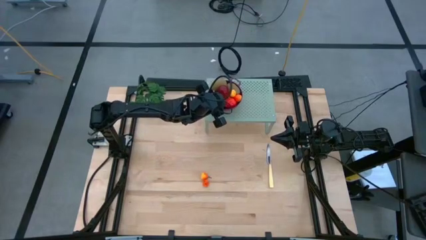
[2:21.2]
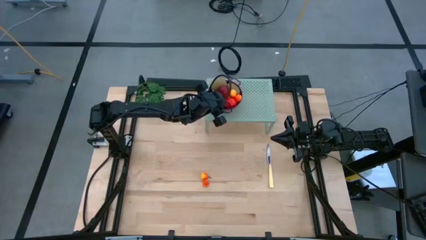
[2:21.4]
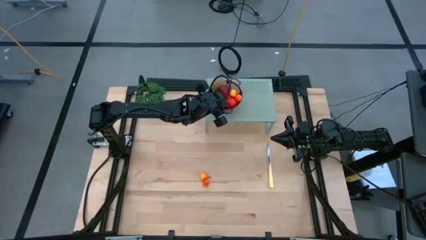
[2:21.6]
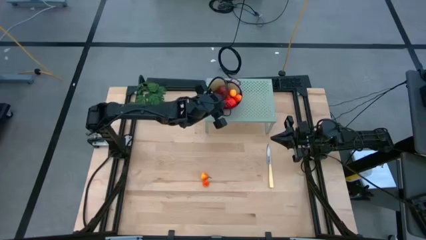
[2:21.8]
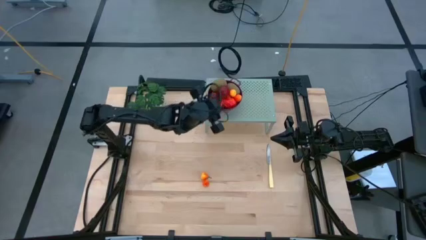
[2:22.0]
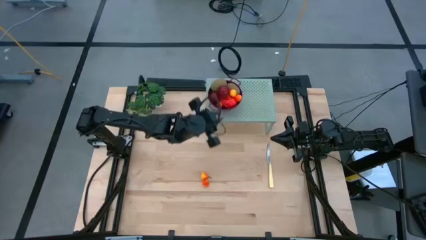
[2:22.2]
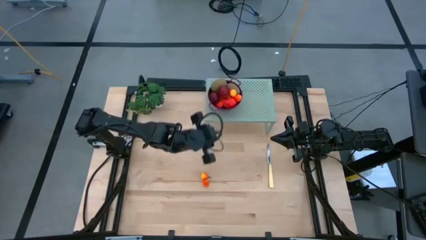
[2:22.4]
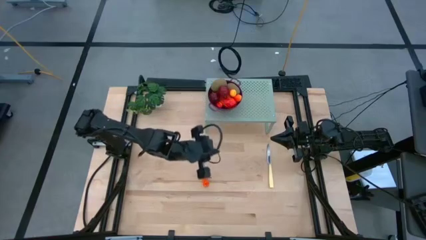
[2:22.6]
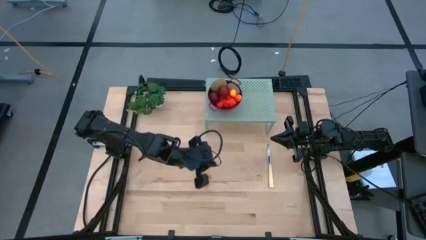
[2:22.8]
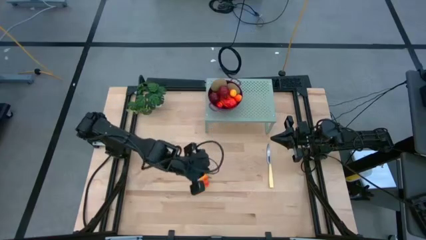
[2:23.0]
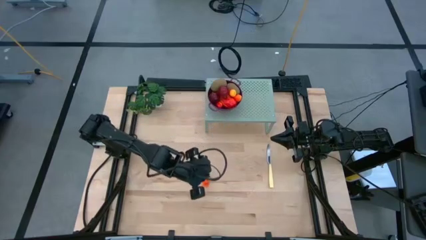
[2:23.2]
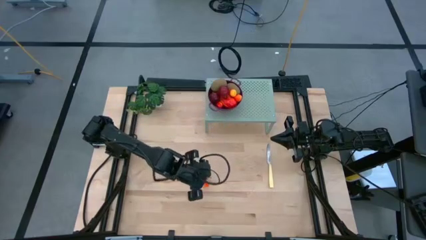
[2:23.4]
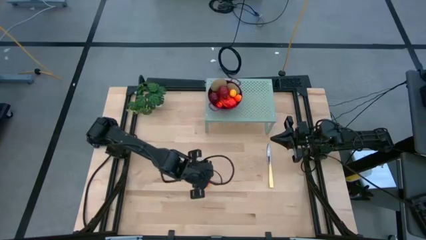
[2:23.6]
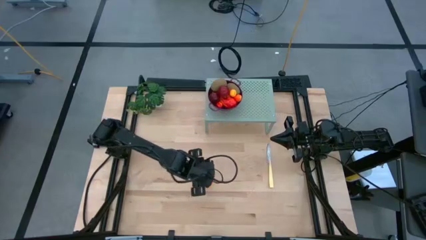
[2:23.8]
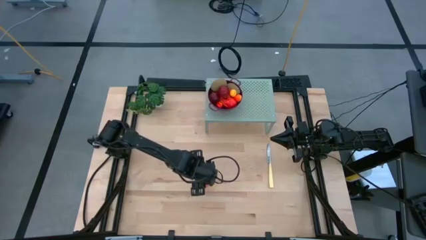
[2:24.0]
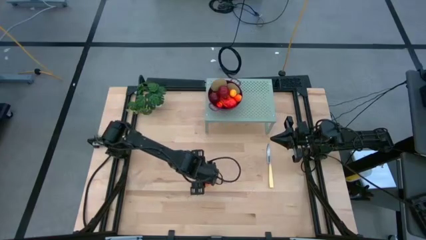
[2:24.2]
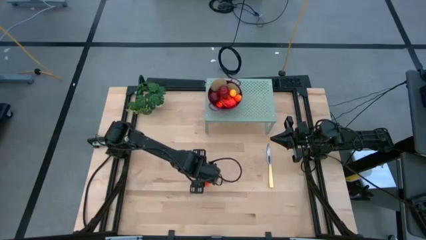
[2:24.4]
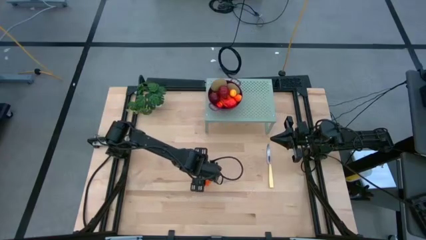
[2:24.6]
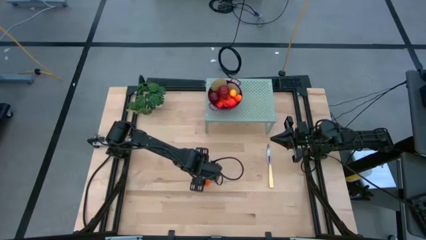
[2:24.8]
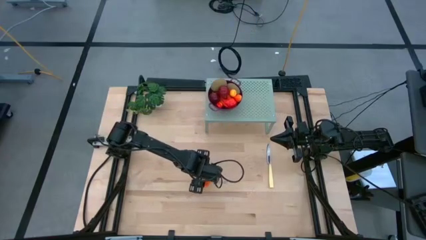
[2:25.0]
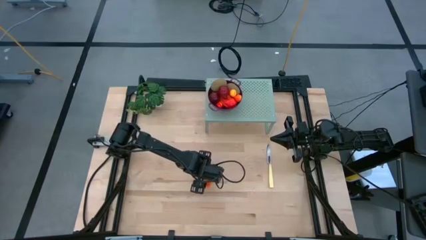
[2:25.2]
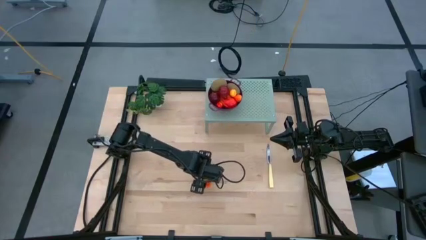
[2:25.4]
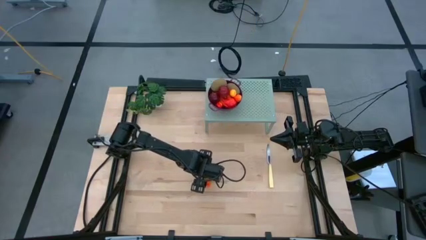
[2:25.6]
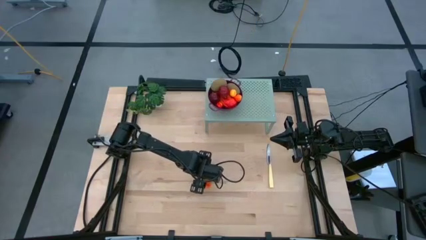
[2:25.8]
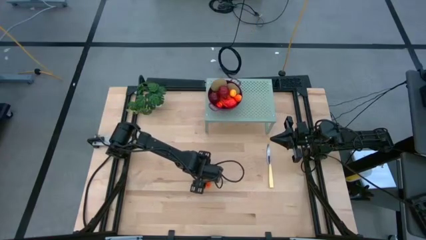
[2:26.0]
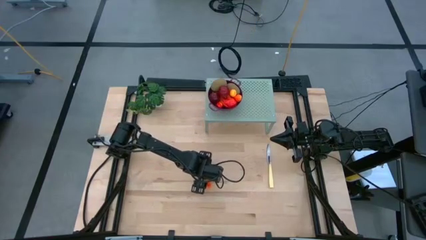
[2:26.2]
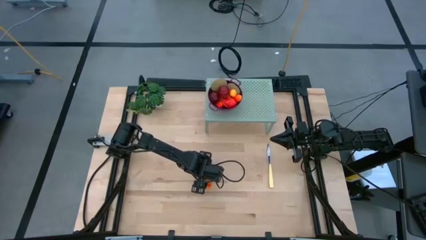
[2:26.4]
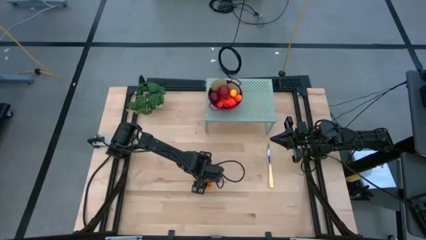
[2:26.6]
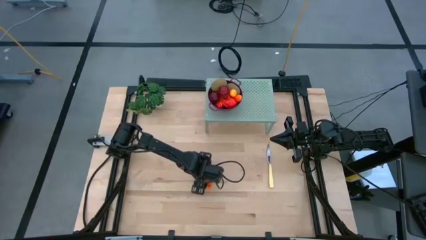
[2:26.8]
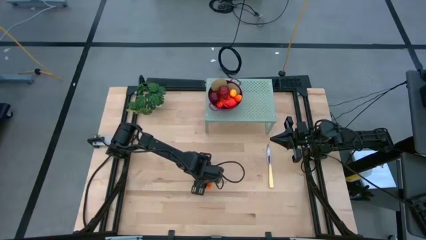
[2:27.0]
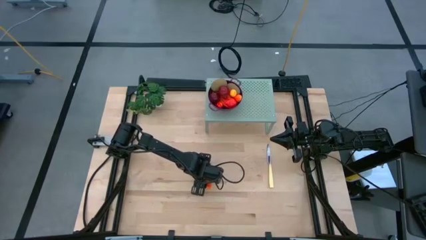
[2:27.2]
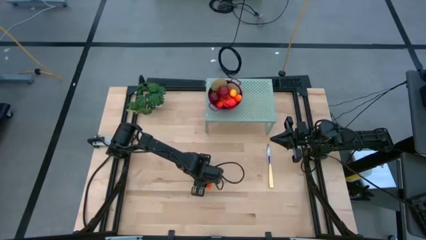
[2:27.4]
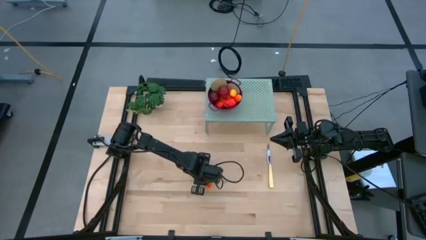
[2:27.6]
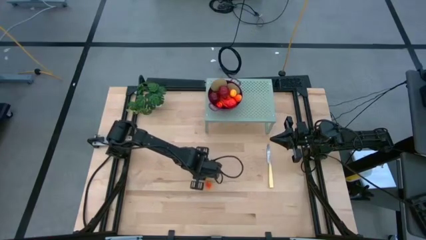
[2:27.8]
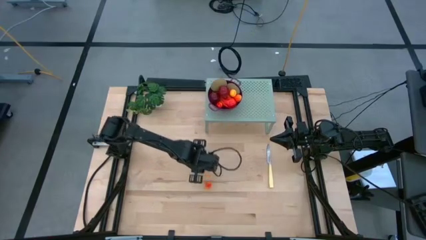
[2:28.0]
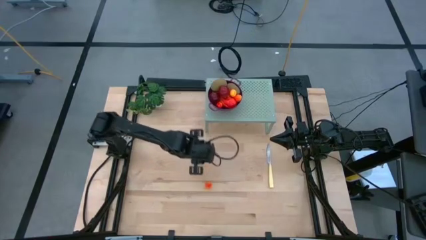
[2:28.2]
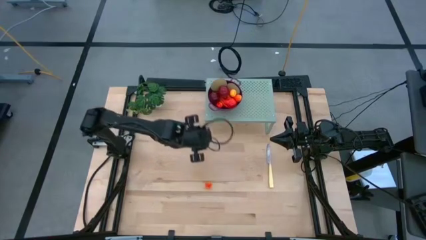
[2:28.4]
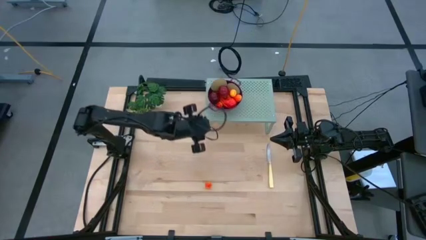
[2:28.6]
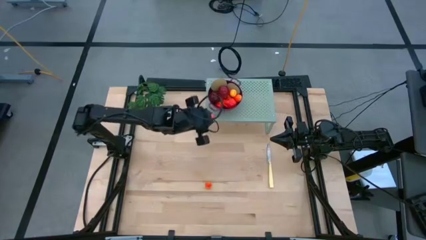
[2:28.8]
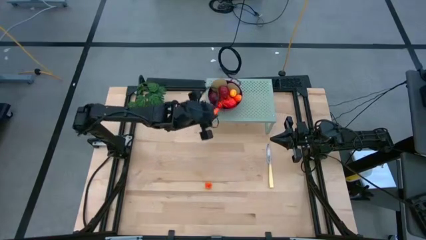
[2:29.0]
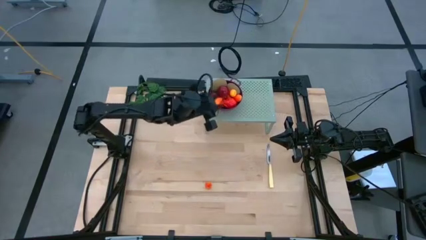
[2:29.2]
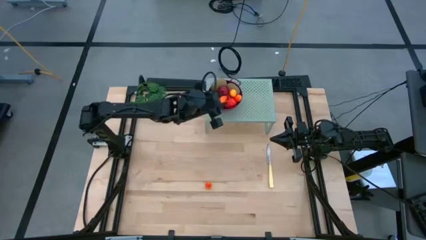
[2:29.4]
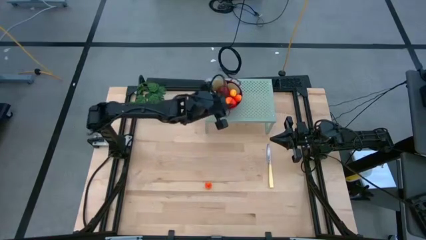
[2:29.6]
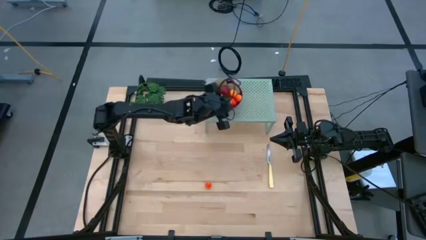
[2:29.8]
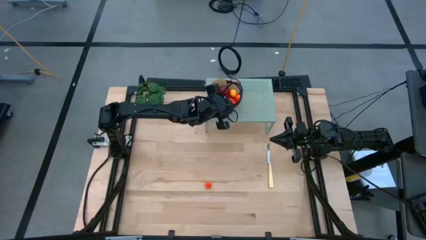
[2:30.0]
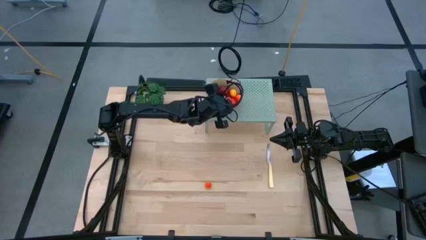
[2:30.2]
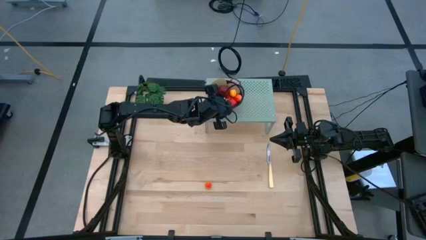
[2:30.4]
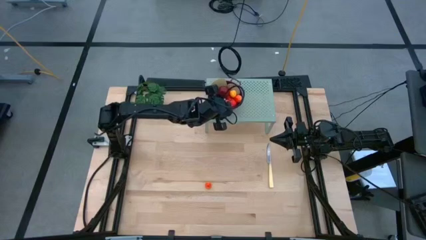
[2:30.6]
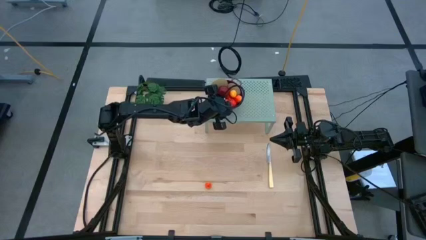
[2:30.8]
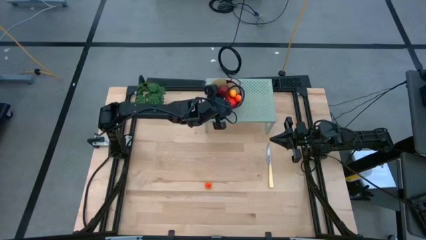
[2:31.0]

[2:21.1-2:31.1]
Task: Pick & Place Fruit
Put the pear into the dark red colander on the shelf
